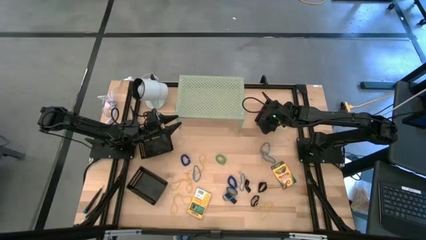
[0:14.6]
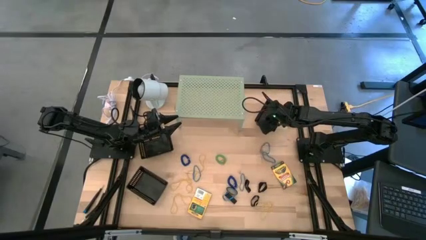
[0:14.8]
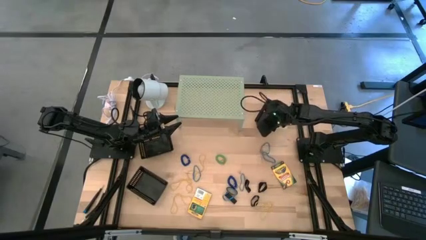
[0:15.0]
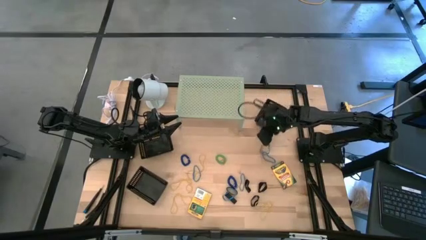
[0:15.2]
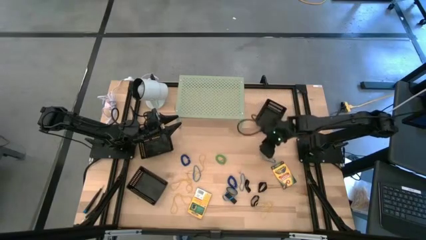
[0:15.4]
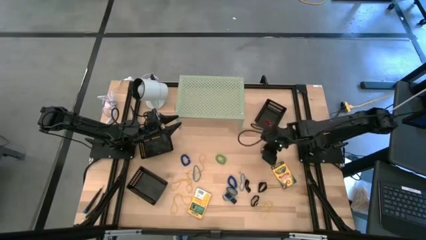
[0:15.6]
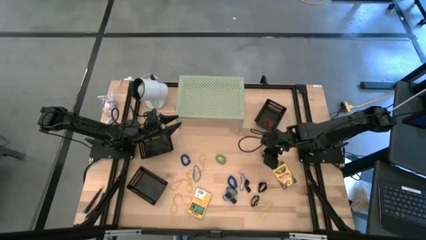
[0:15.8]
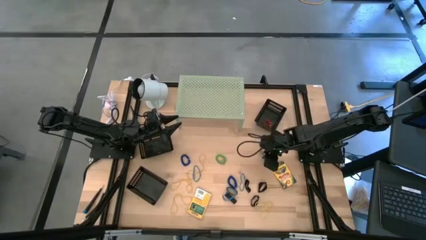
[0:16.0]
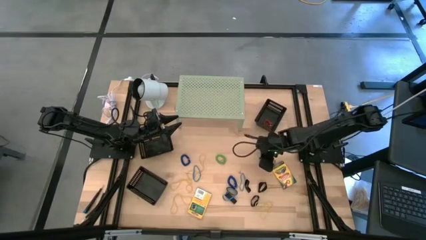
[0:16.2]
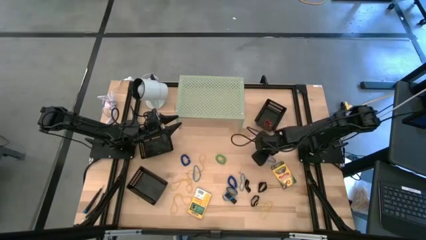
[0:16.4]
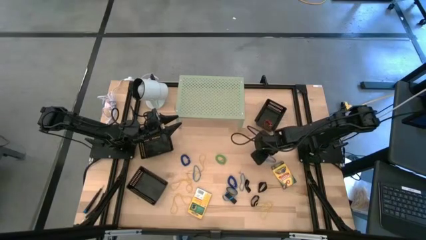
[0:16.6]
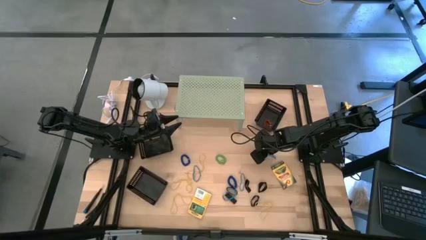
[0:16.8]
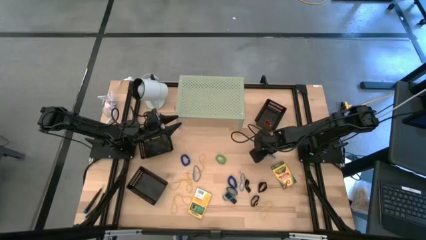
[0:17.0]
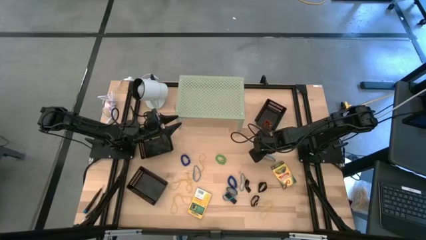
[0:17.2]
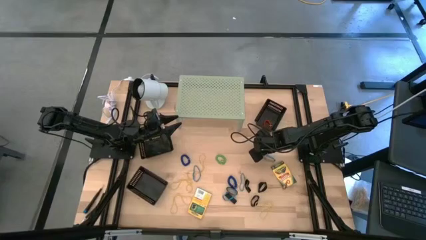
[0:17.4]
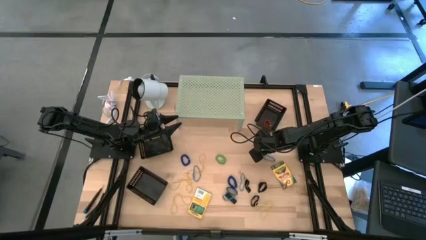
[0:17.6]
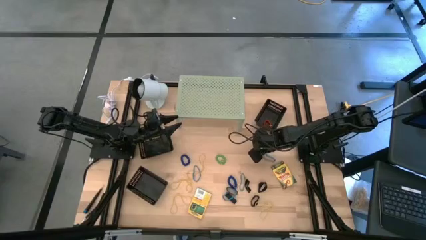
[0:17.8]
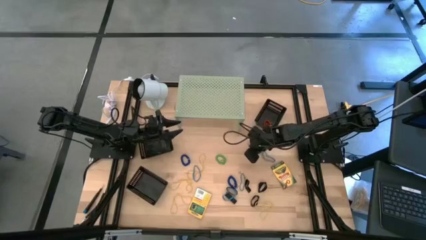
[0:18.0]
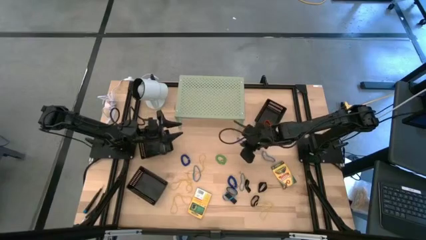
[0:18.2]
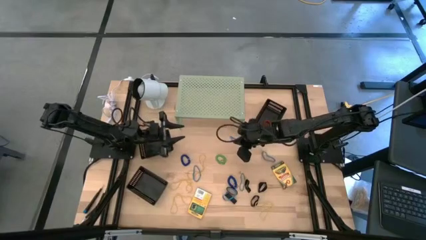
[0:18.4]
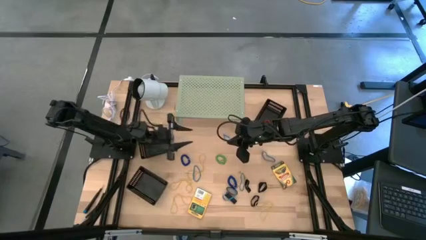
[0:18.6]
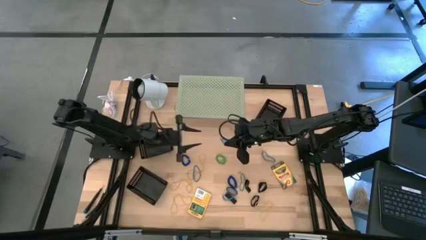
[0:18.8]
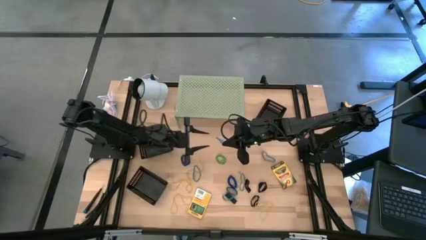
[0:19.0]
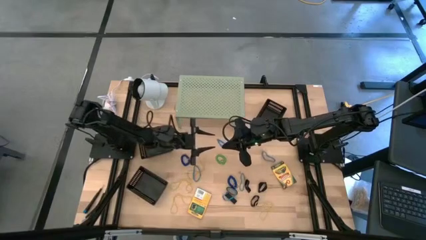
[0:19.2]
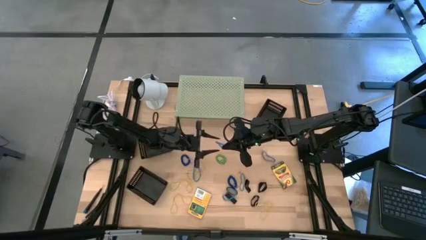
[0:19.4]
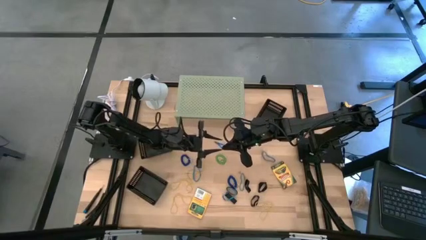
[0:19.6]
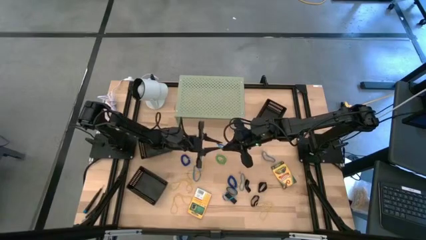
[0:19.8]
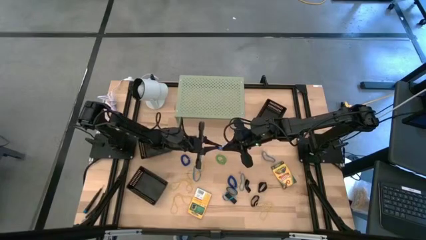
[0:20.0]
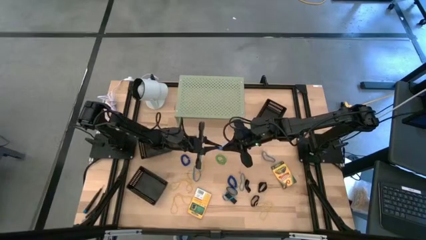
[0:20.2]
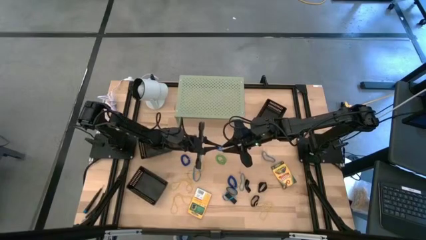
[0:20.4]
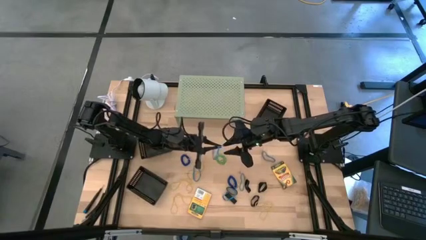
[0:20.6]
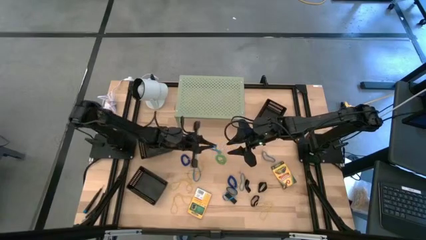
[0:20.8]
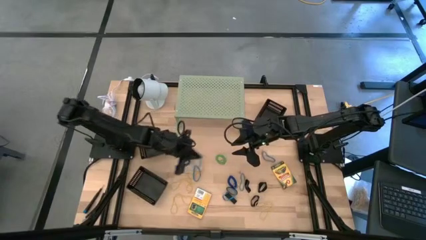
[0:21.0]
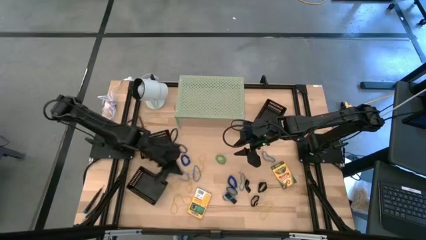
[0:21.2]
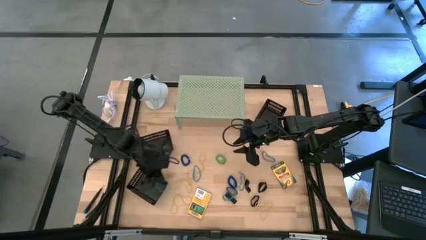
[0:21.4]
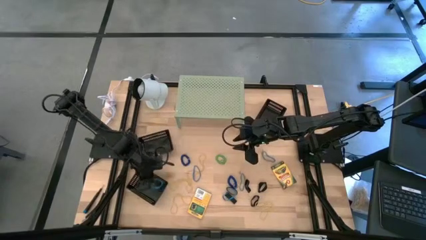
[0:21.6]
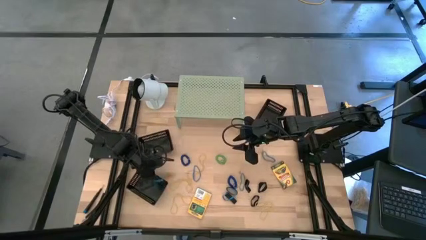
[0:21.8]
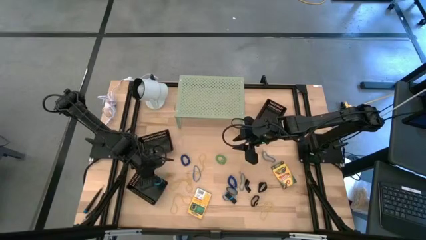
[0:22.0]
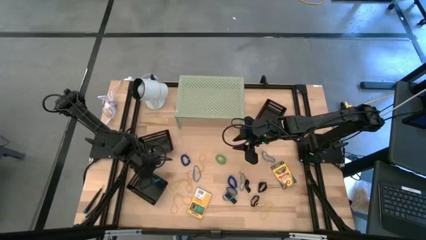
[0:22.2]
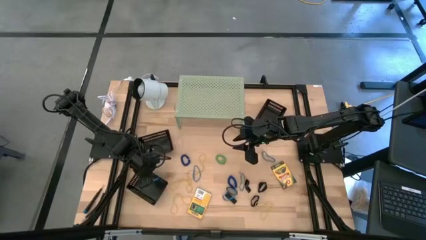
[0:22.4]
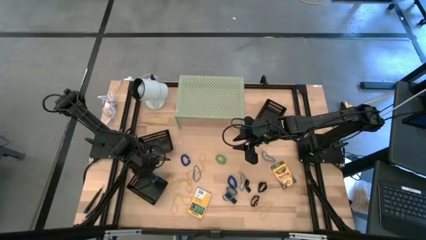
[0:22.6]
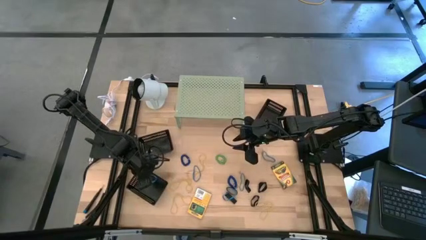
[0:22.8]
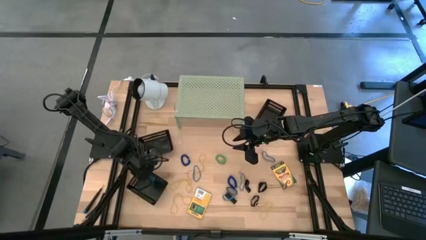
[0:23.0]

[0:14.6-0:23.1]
Task: Pick & Place Office Desk Supplies
Put the blue rubber band into the bottom left black bin

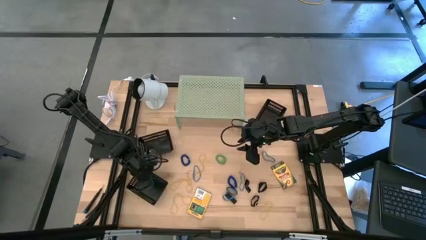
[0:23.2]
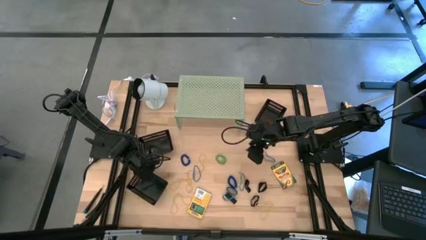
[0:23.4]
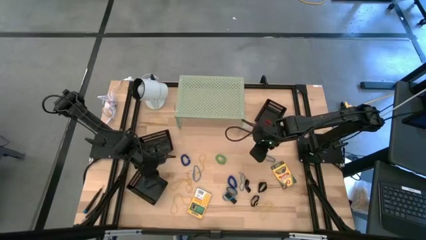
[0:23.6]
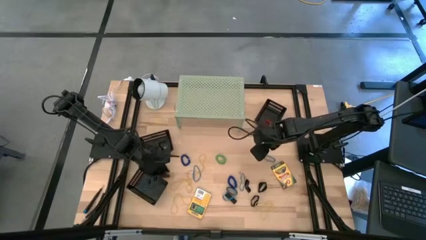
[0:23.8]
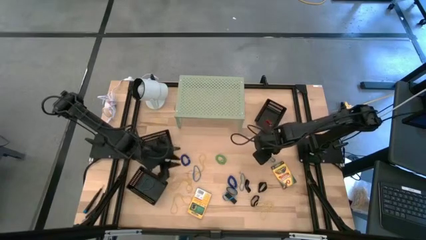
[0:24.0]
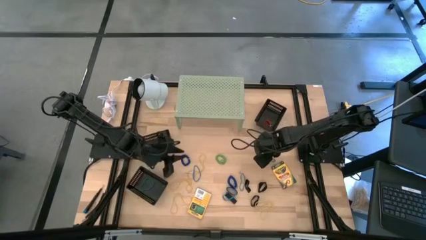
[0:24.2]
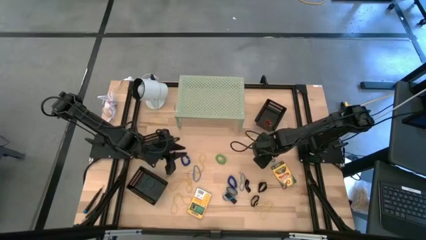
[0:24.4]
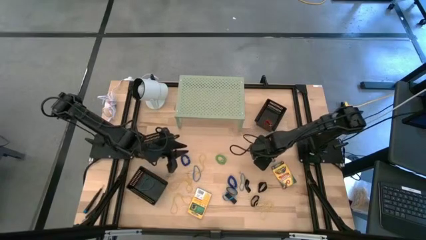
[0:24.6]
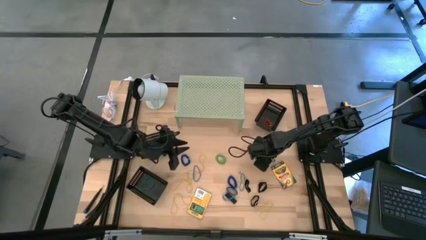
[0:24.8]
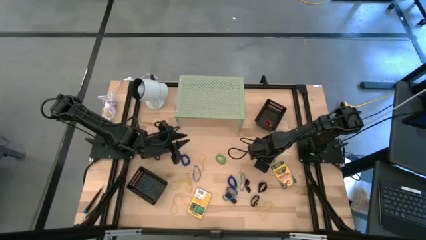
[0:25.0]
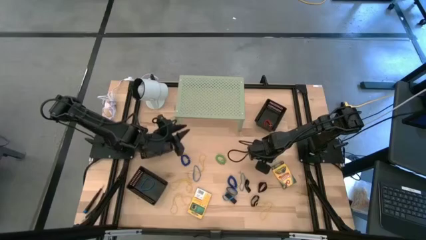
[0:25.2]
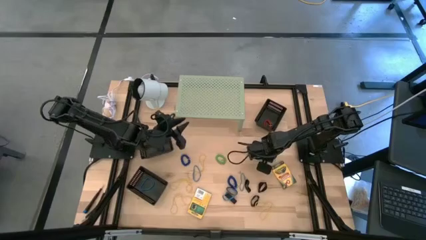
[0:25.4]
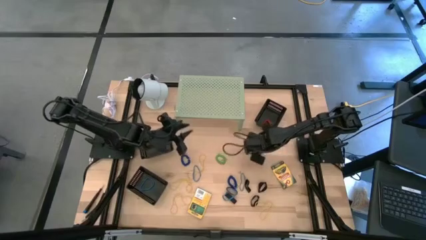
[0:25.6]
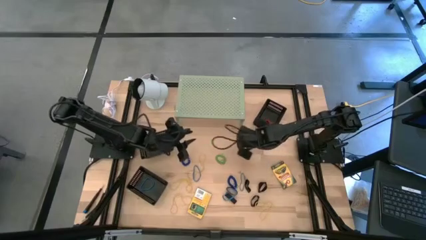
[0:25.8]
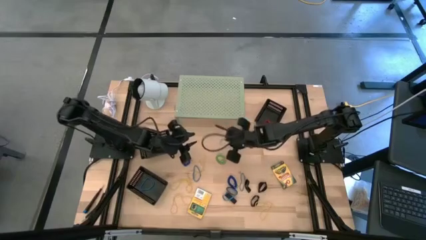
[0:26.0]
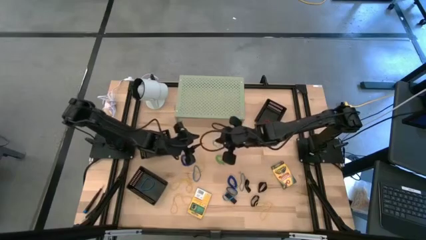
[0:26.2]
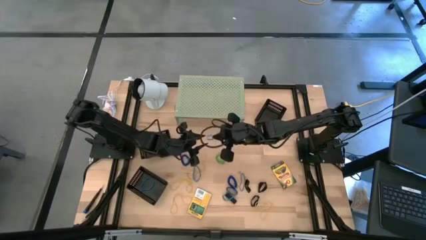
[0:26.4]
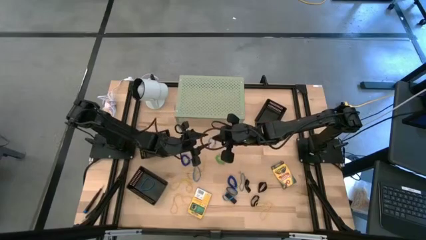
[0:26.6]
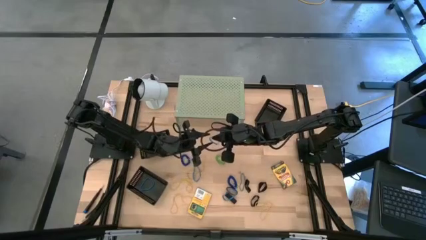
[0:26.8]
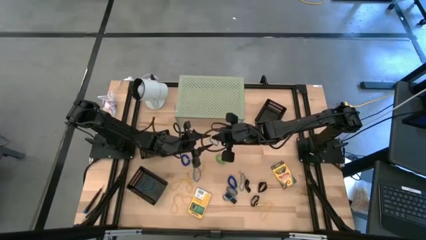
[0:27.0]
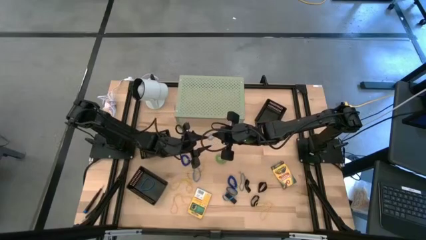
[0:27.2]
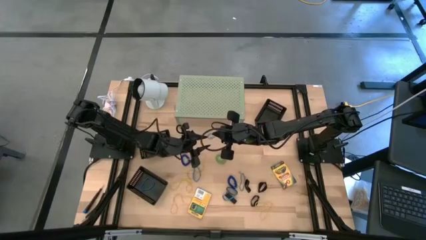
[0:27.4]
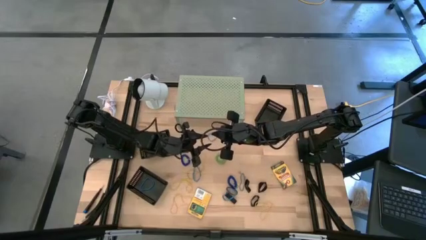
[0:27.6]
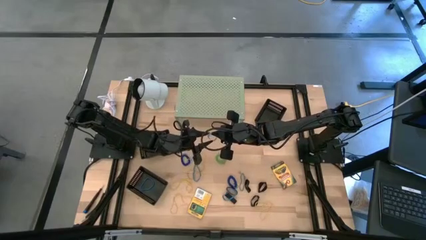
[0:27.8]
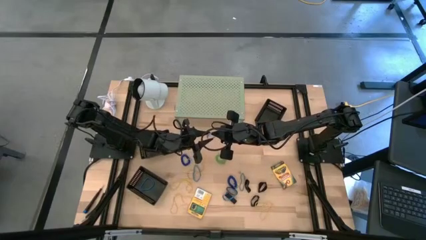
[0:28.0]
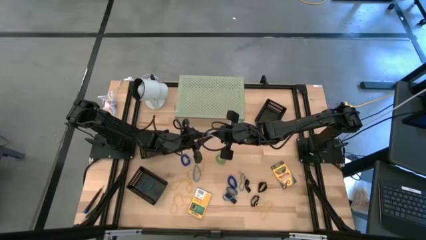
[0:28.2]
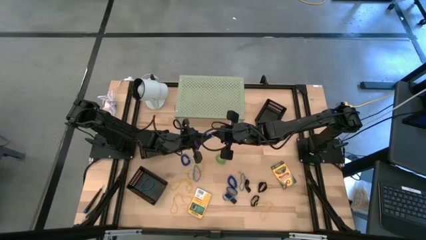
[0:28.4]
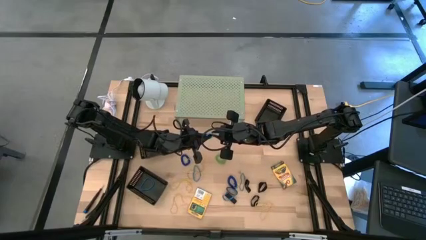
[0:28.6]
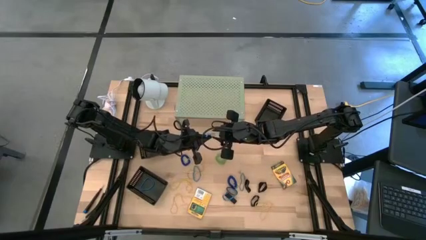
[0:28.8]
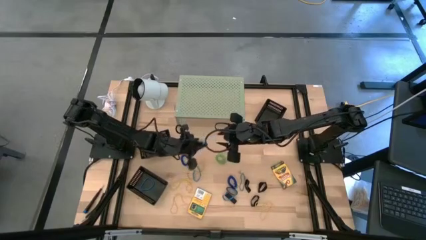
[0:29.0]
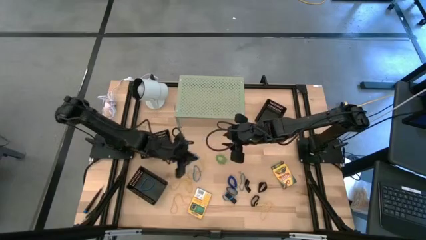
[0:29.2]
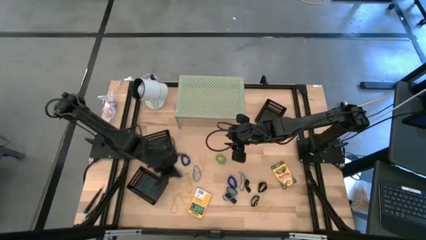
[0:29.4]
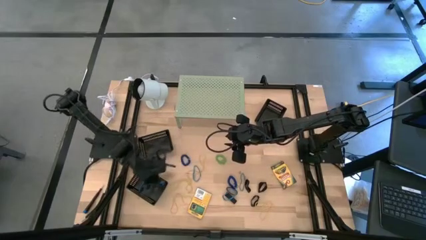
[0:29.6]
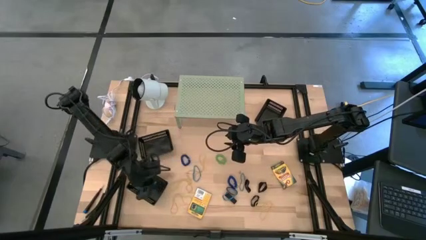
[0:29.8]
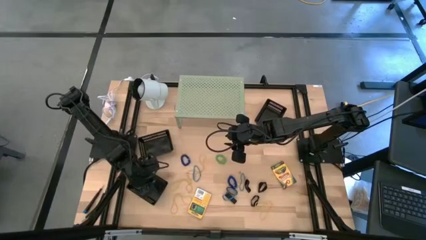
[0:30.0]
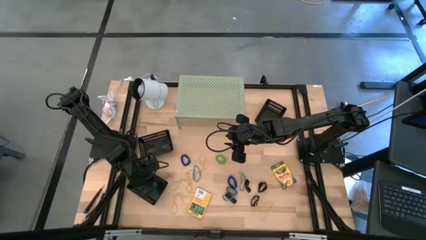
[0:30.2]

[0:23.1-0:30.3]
Put the blue rubber band into the bottom left black bin
